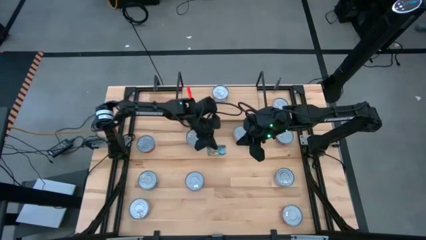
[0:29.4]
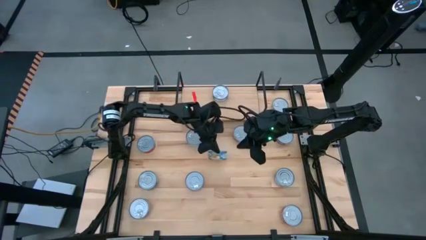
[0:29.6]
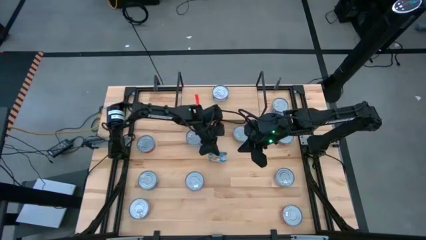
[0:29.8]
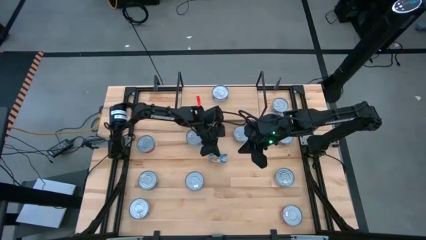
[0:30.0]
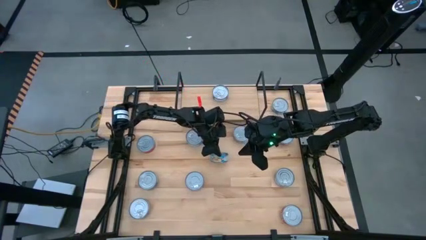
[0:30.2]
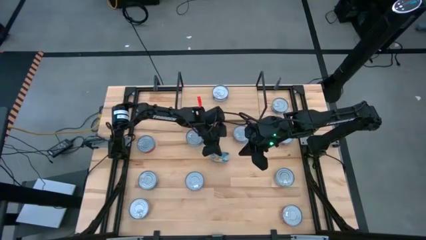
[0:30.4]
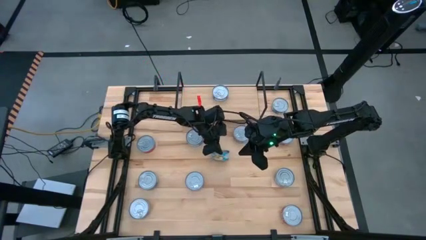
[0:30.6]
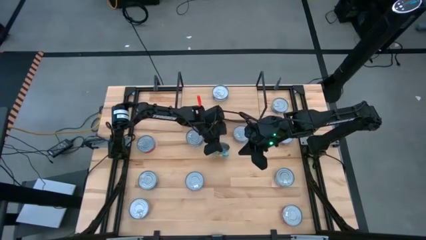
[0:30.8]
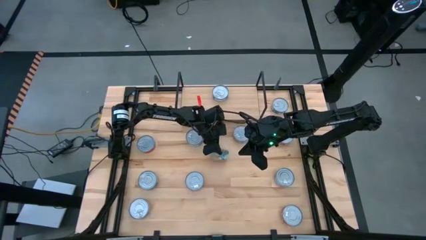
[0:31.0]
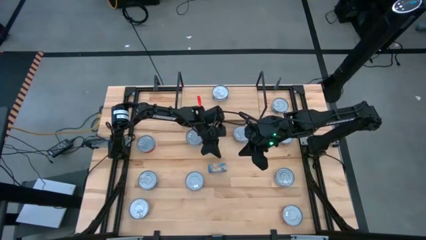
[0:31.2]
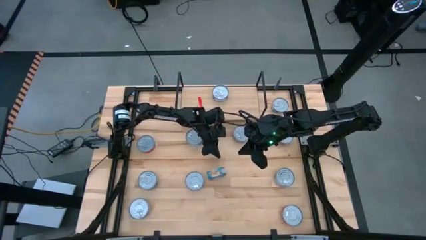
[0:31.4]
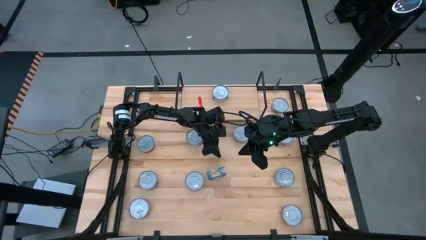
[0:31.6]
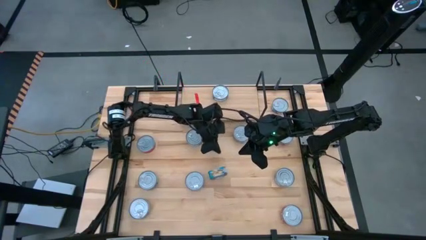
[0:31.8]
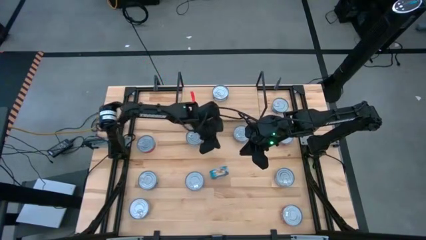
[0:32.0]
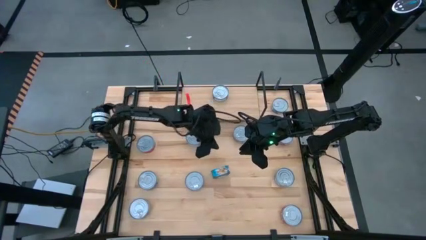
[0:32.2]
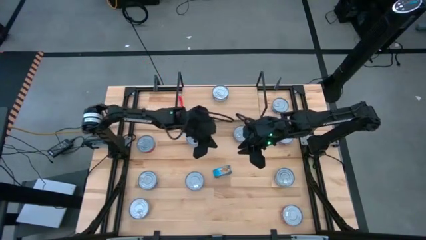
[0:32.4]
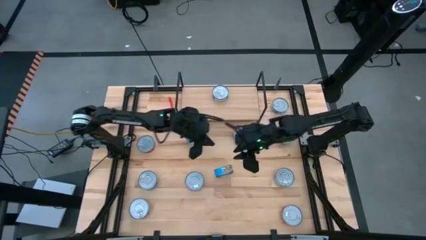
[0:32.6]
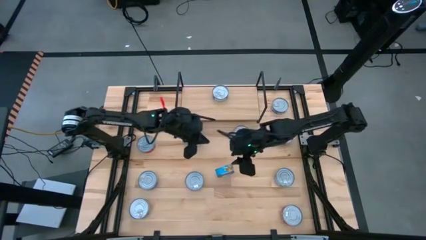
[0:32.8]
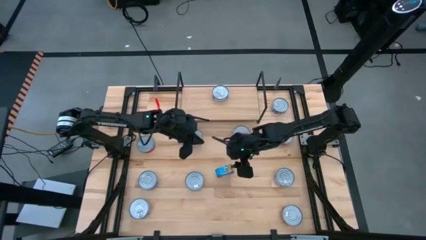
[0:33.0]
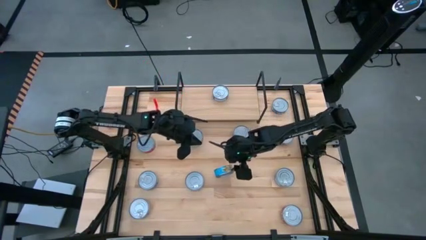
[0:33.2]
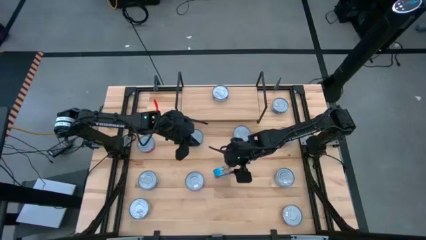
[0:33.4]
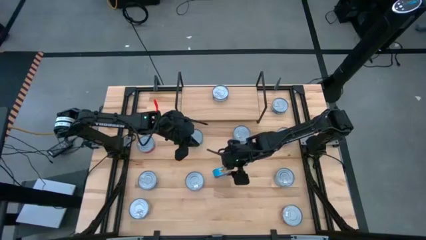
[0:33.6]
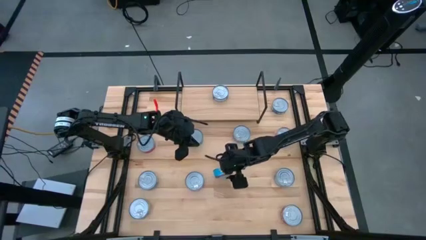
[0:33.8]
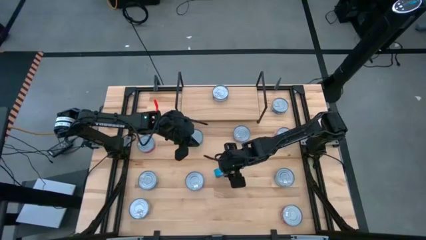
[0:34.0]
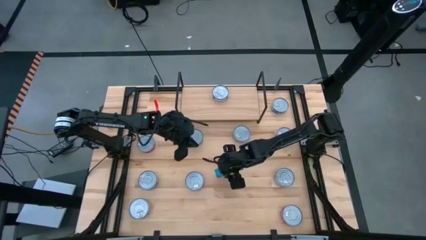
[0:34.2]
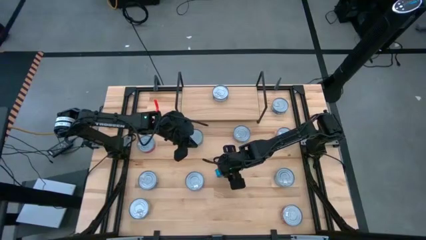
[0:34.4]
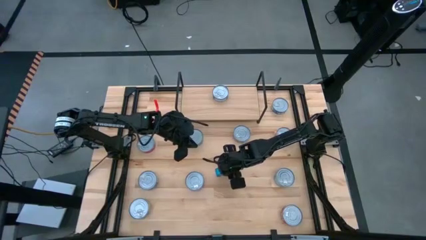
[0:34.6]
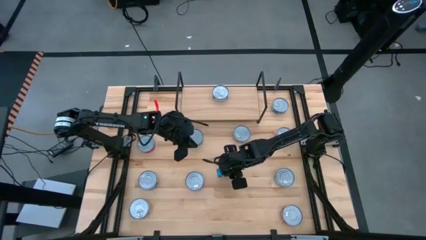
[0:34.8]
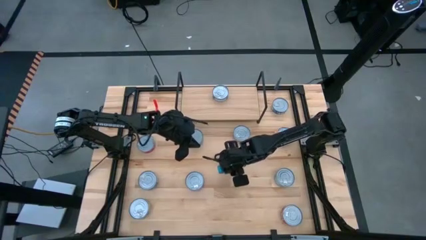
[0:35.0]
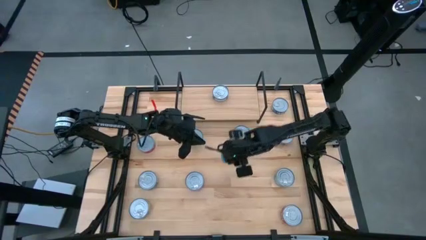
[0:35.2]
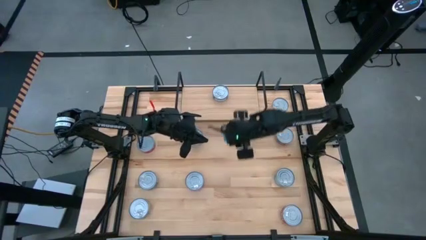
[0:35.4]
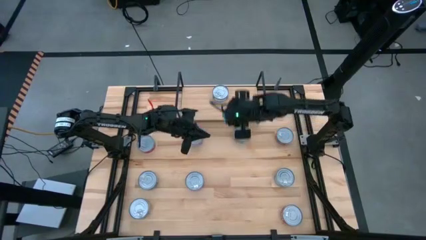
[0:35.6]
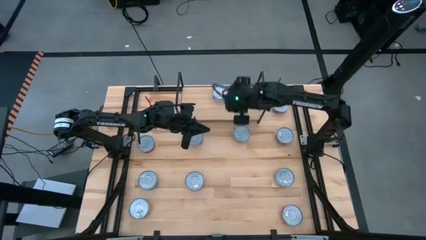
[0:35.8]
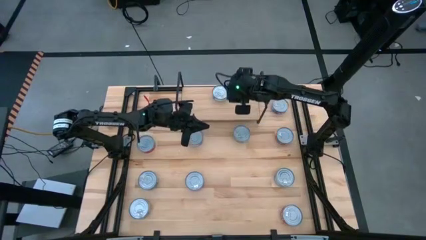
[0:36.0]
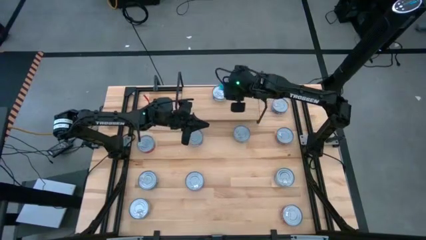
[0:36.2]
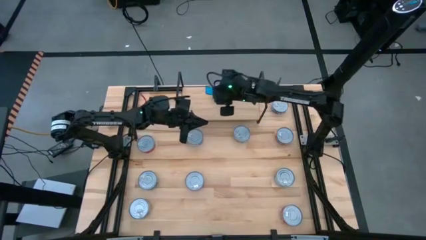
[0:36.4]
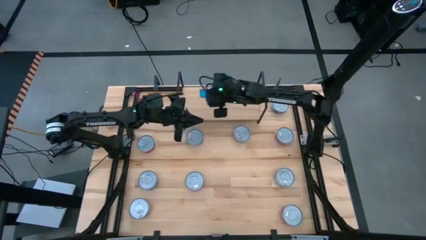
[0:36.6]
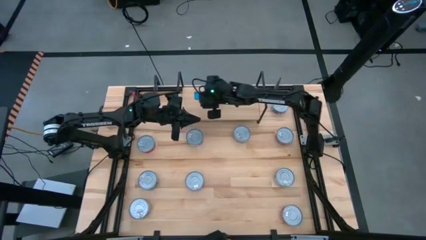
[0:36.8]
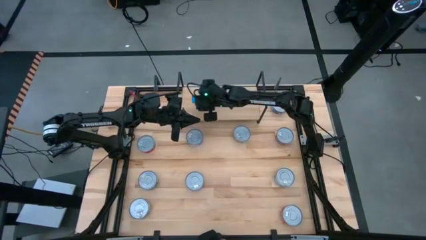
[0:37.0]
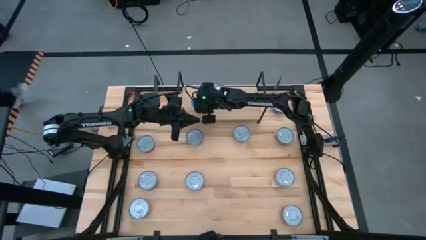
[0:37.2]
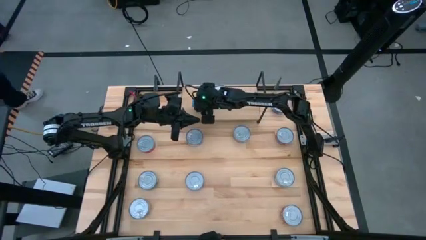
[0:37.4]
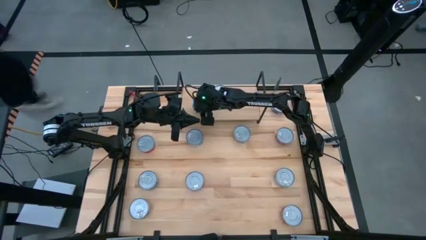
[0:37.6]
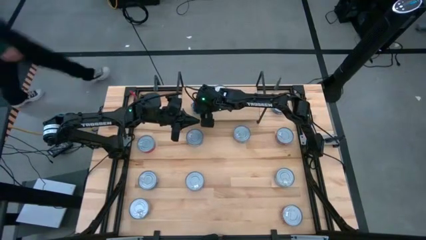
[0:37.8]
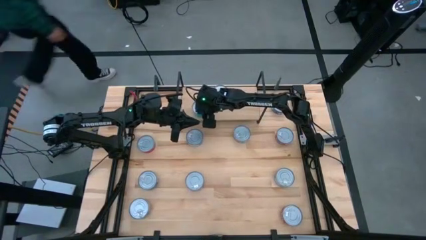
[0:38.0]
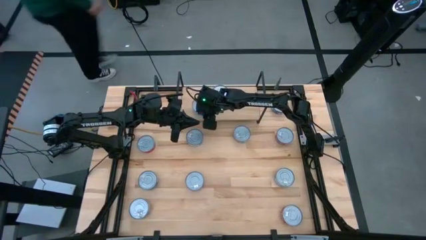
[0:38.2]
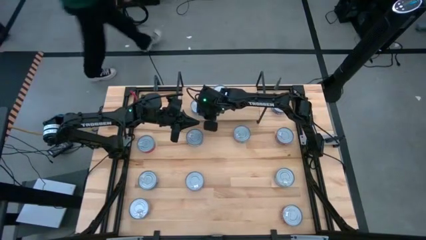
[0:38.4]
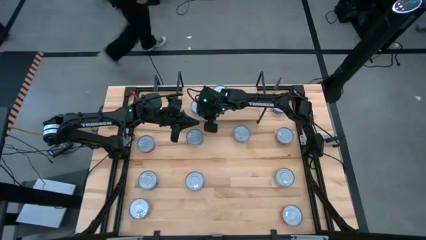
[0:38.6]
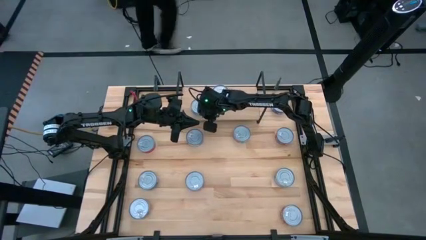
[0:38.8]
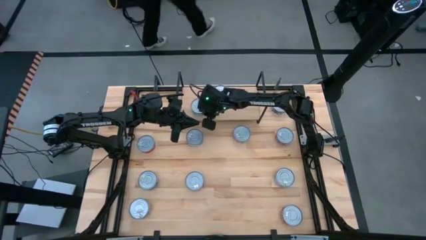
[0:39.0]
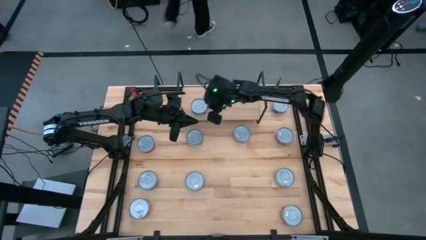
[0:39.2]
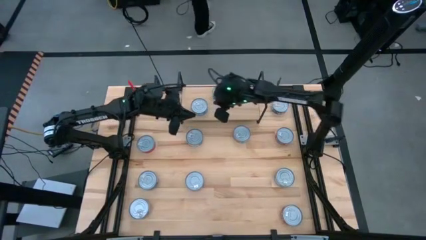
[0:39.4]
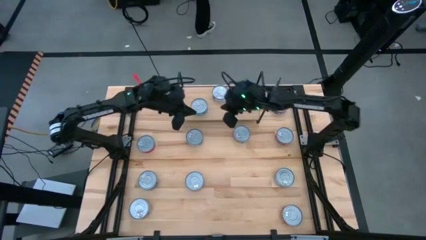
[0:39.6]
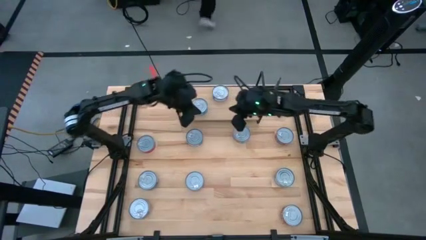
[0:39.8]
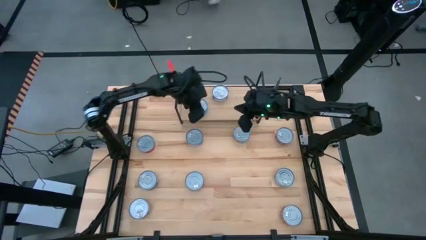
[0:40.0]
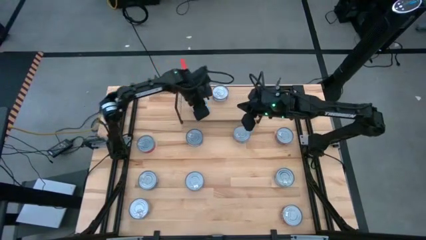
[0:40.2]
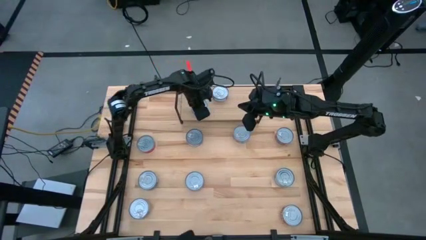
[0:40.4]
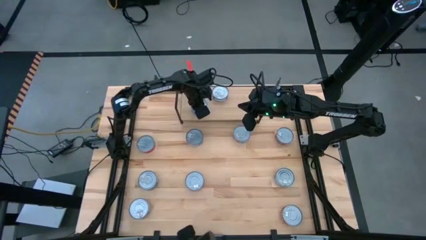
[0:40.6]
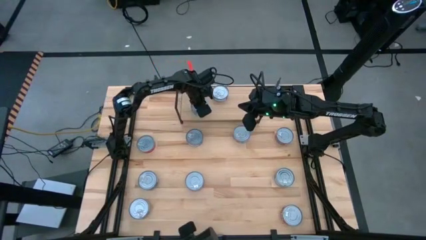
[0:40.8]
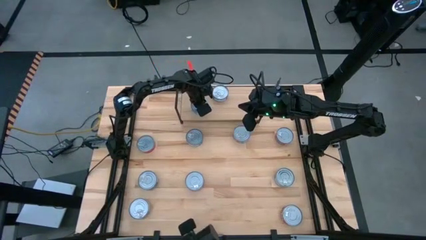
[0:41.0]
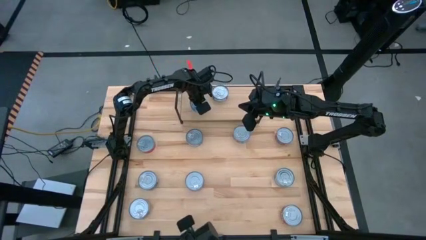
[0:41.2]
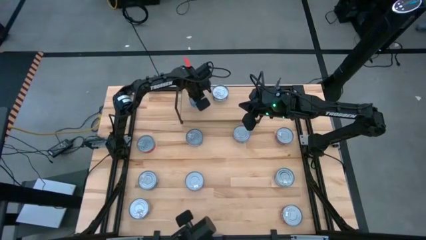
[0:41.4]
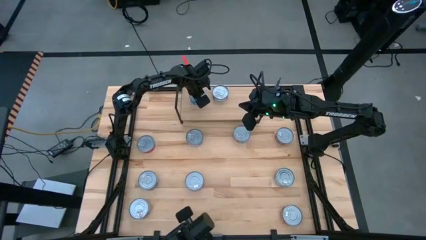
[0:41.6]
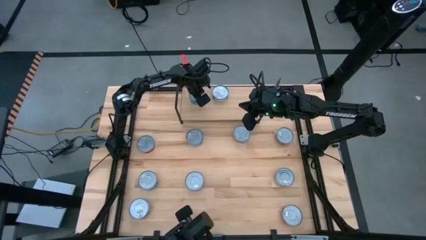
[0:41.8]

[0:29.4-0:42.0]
Task: Stack canned seafood by type on shelf
Put the yellow-blue tuna can on the shelf
